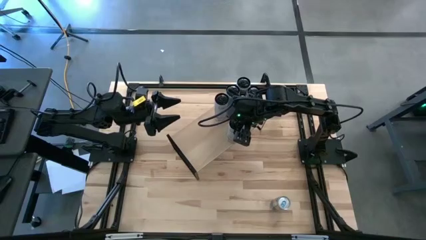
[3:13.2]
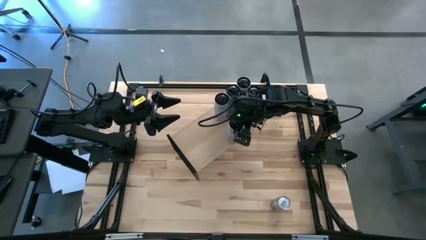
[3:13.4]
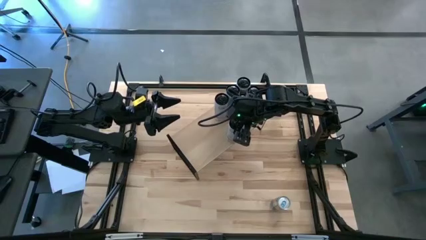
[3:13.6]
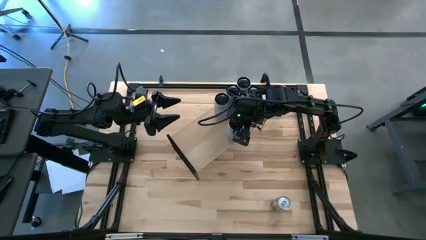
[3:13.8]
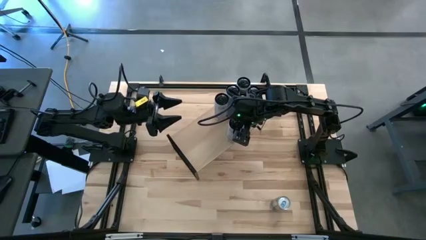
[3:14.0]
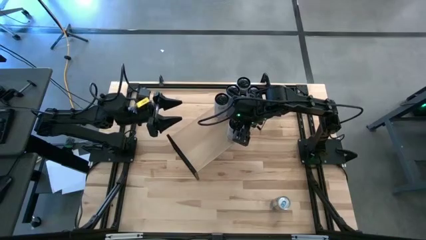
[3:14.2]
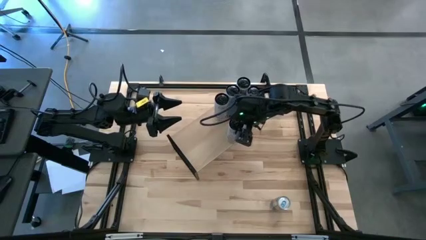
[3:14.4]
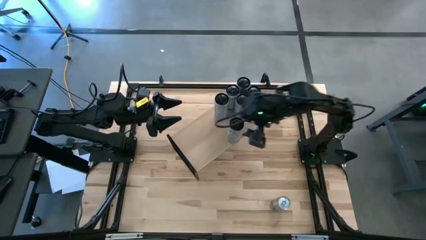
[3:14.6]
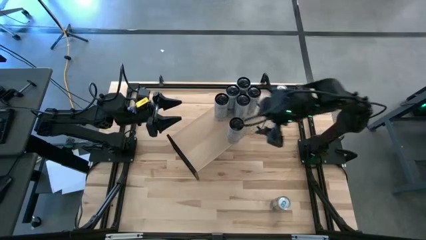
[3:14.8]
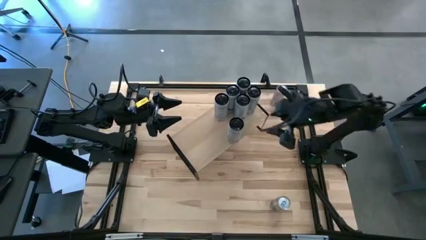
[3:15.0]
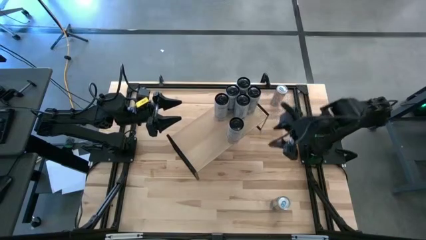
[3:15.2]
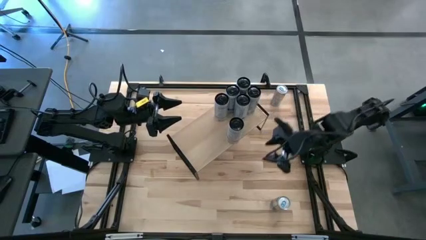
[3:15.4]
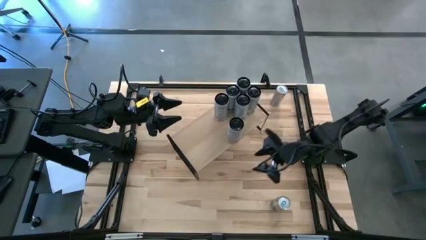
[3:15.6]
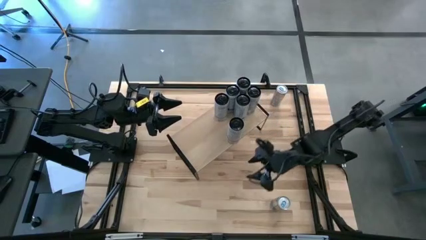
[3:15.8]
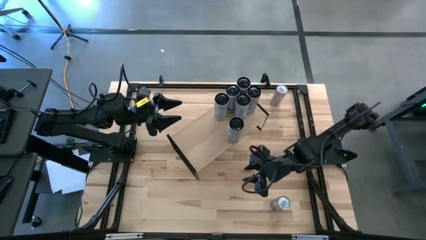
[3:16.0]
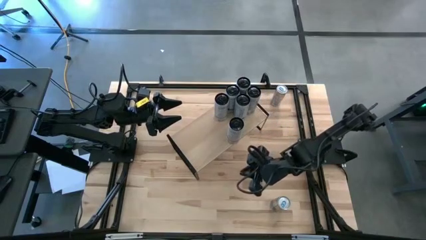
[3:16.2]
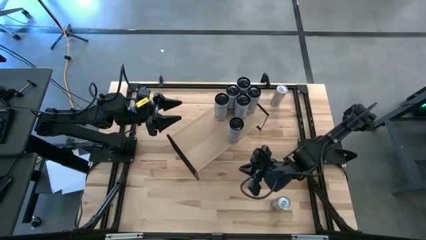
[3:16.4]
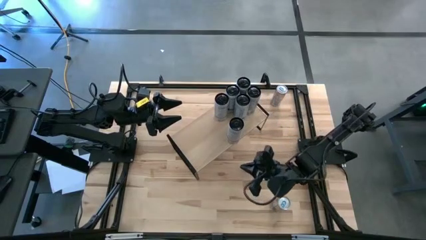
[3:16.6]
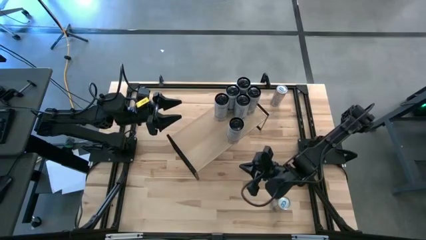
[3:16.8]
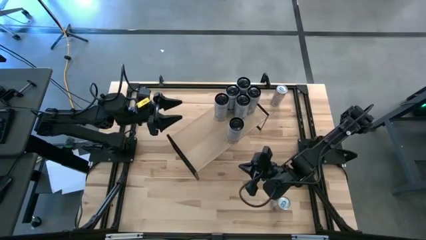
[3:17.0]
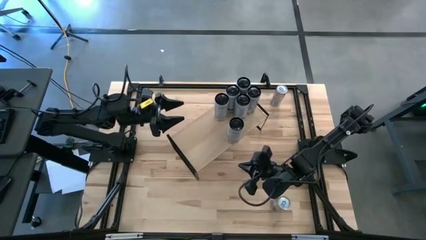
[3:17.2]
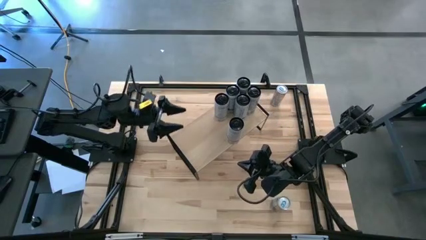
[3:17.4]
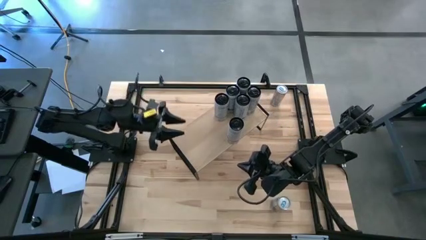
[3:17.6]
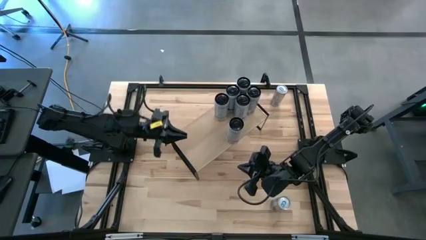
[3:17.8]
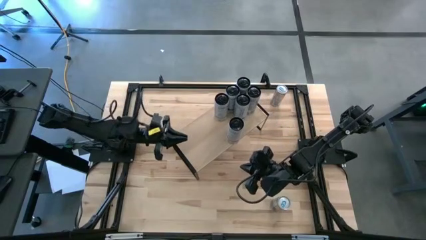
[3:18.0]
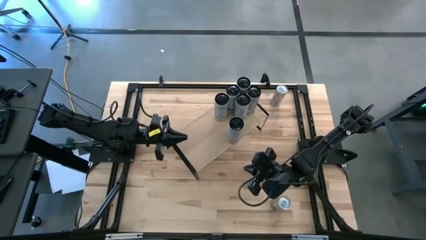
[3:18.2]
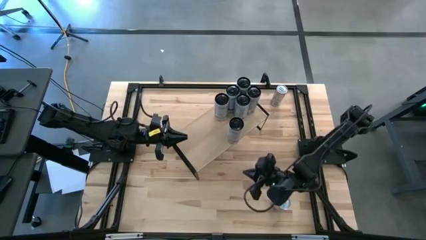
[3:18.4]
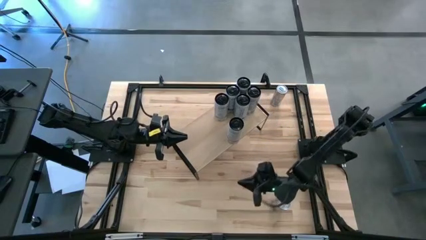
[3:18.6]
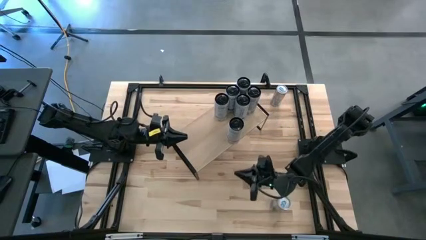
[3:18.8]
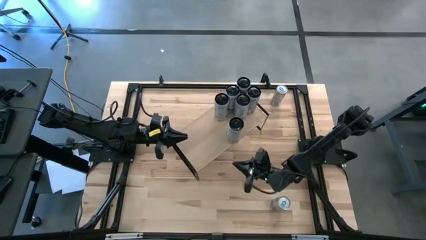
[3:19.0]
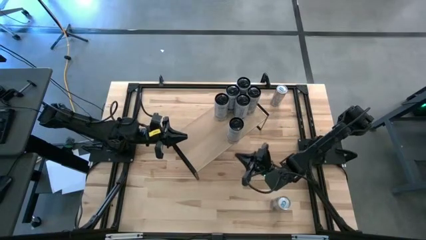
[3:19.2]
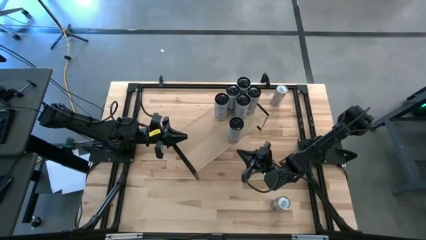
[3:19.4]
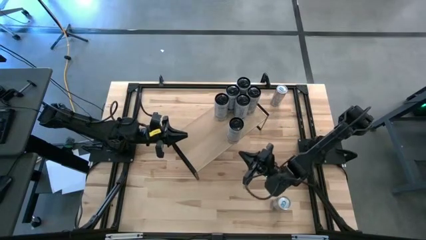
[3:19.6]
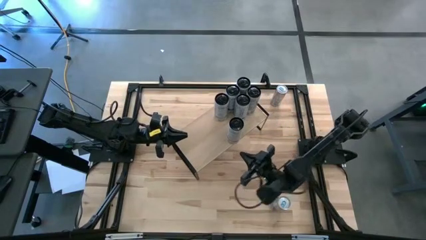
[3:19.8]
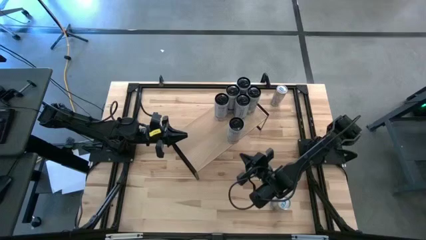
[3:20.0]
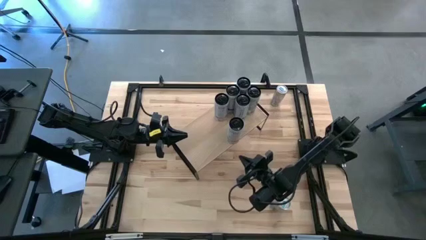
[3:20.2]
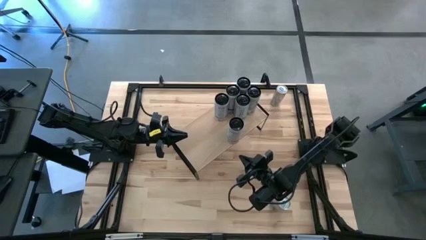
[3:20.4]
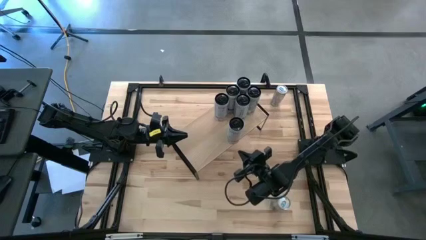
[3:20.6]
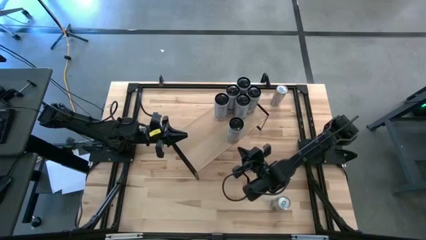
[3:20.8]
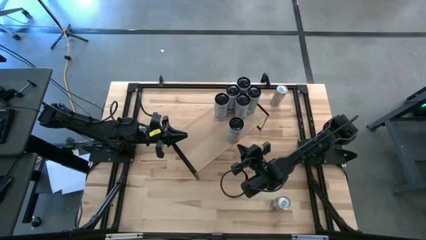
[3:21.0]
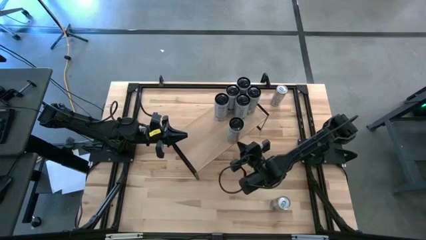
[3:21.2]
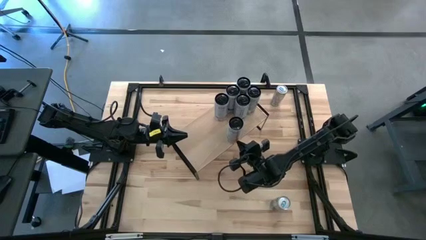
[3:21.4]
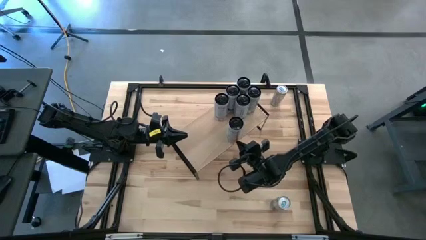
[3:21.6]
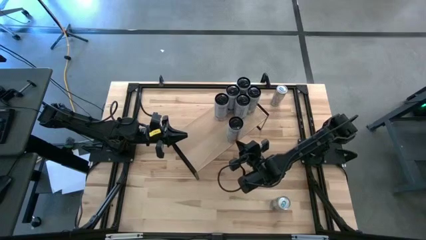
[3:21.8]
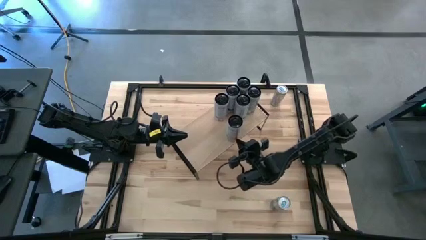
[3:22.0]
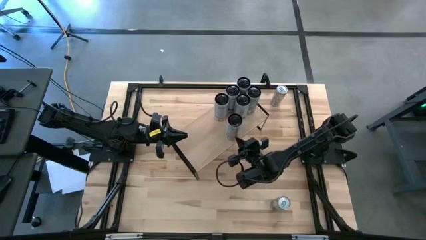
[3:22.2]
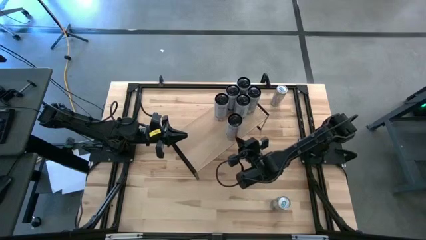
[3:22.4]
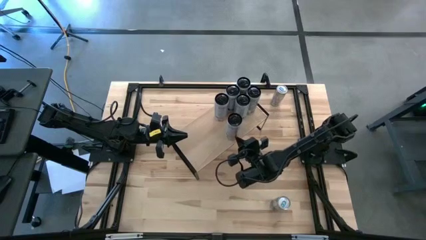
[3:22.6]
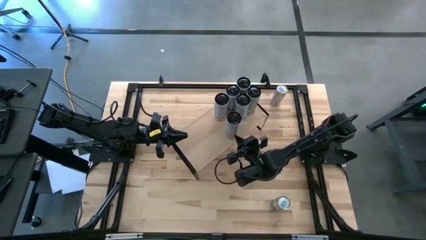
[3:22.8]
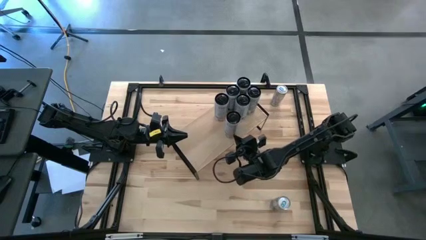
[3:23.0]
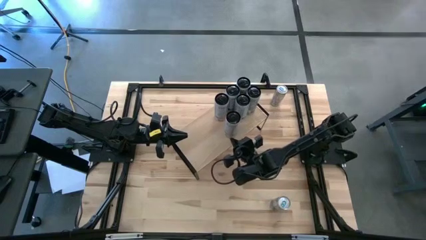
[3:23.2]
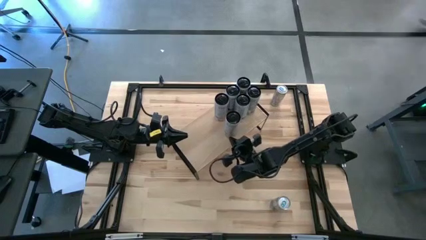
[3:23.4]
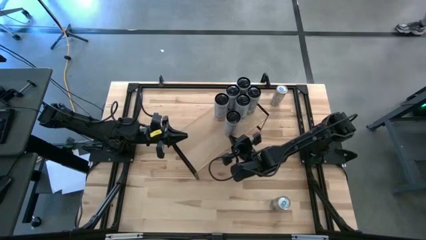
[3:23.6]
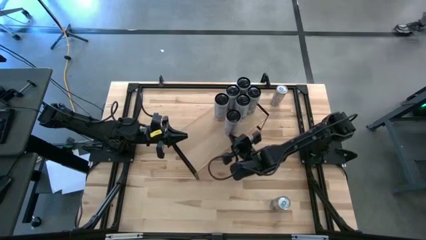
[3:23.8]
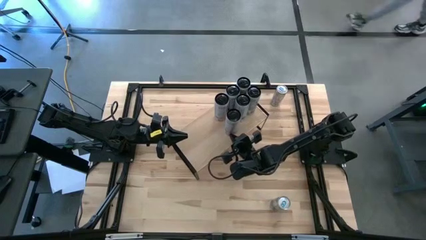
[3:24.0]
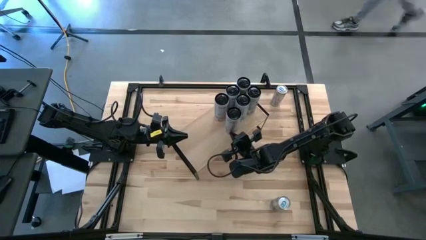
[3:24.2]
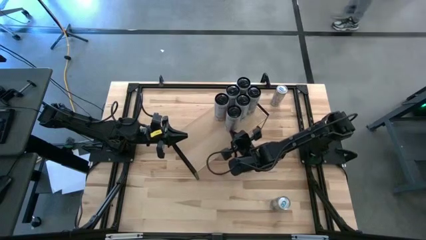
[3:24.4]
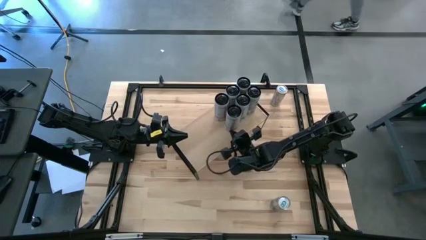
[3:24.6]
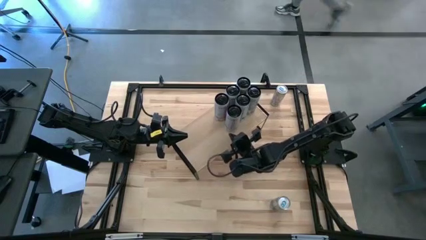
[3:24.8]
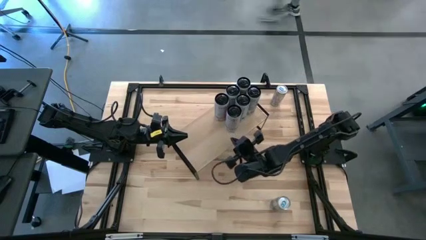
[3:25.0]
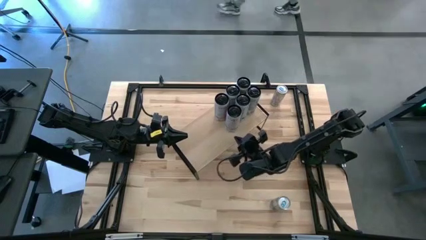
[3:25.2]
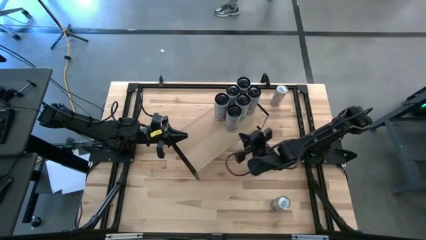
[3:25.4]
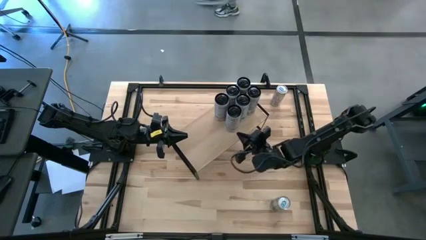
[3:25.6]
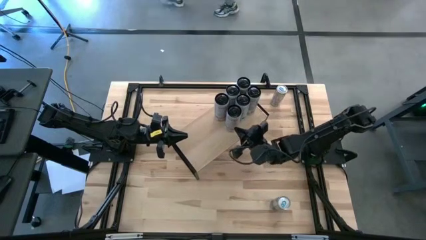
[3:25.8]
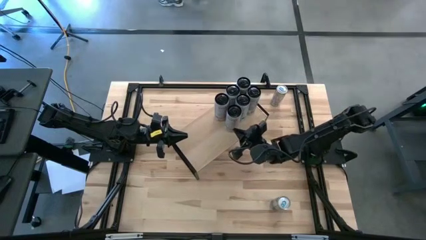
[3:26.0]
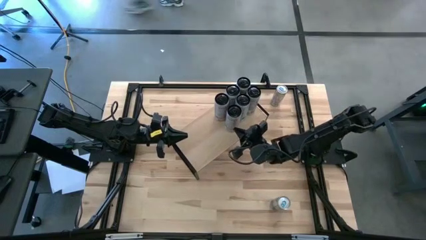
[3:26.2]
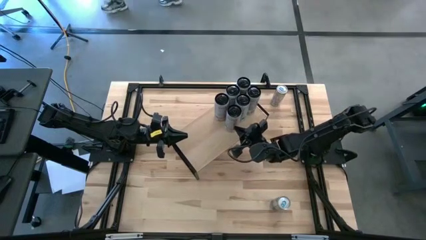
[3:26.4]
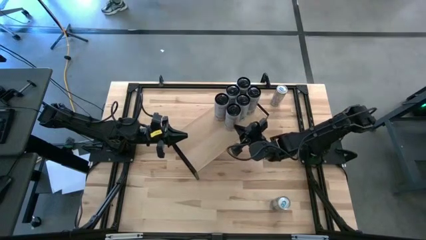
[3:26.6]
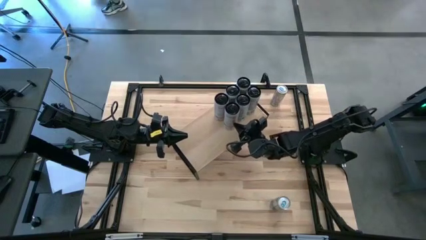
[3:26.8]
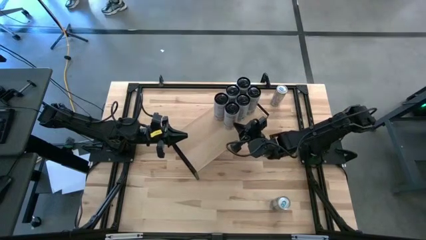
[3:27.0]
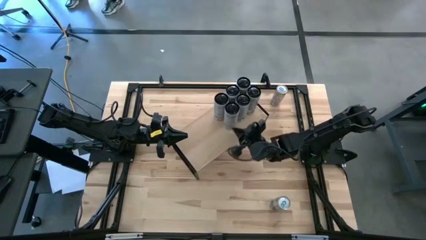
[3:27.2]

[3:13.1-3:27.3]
Task: Place canned beverage on shelf
Put the white-pink soda can on the shelf and align it with the other white-pink soda can
